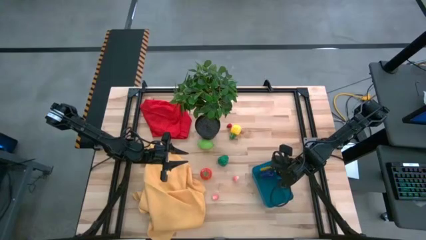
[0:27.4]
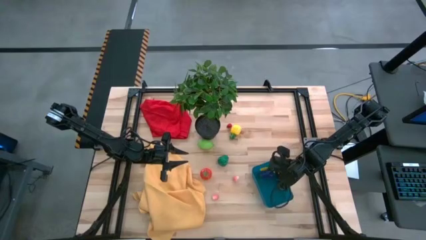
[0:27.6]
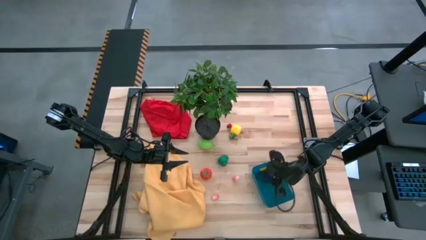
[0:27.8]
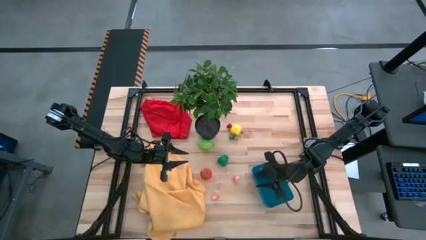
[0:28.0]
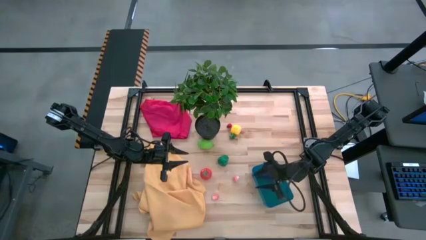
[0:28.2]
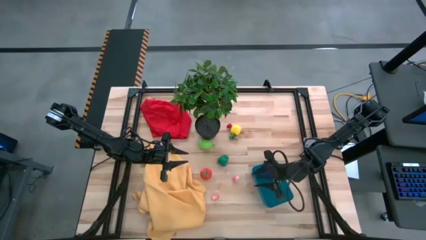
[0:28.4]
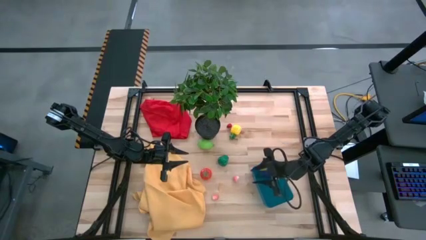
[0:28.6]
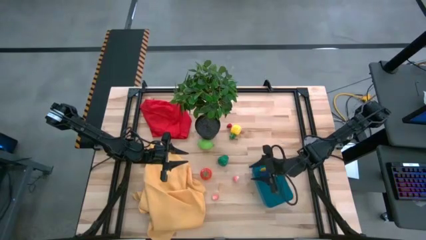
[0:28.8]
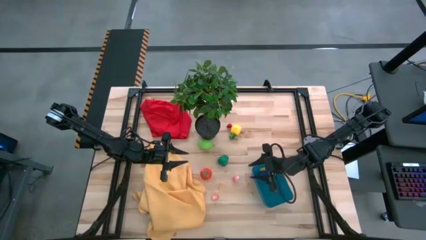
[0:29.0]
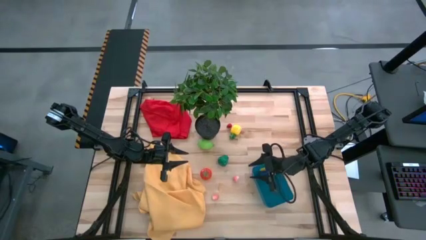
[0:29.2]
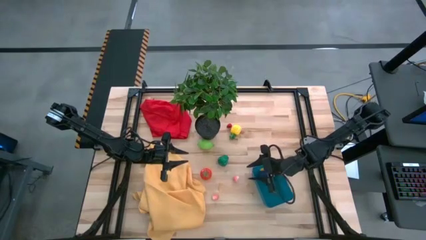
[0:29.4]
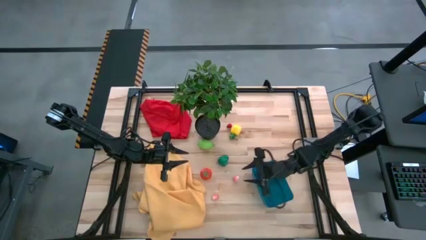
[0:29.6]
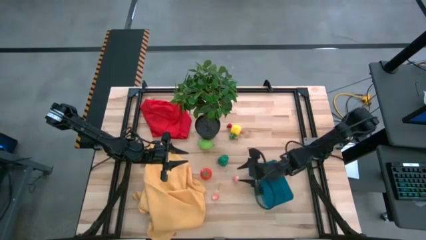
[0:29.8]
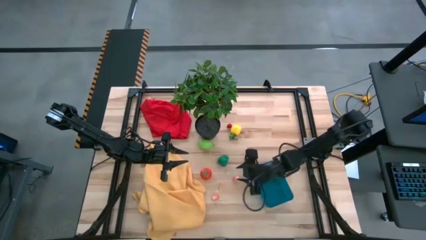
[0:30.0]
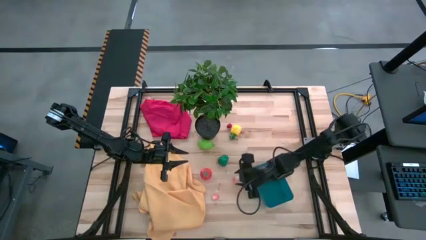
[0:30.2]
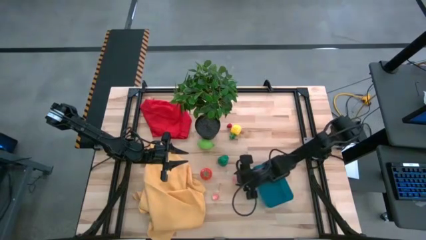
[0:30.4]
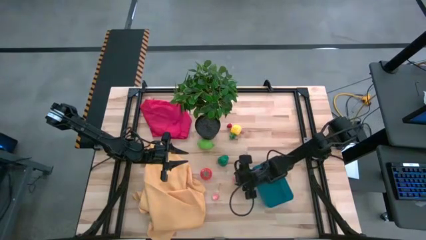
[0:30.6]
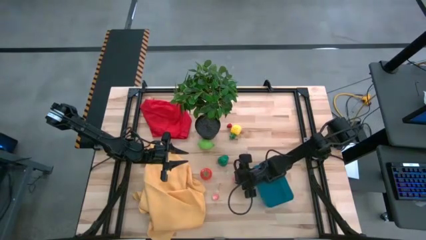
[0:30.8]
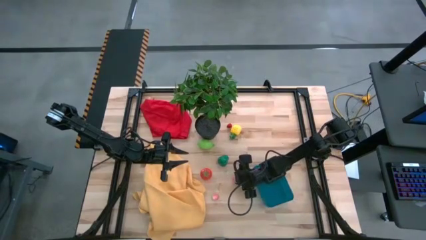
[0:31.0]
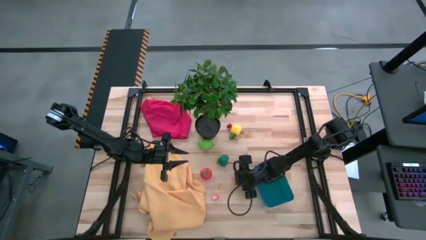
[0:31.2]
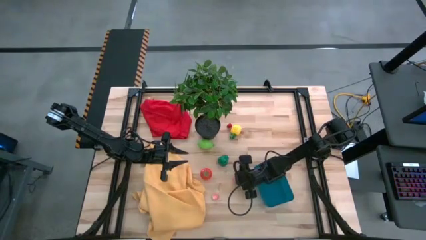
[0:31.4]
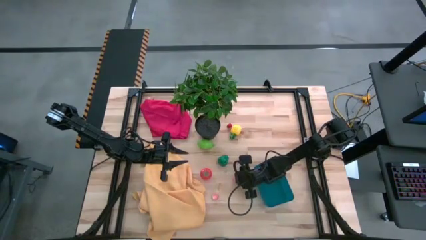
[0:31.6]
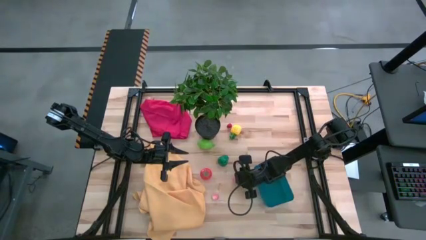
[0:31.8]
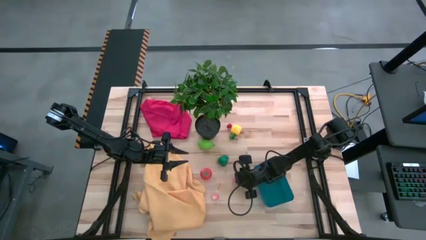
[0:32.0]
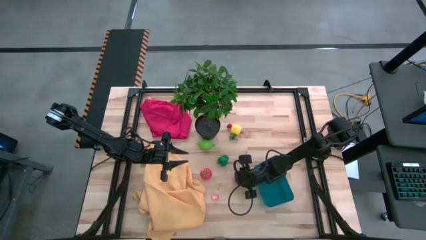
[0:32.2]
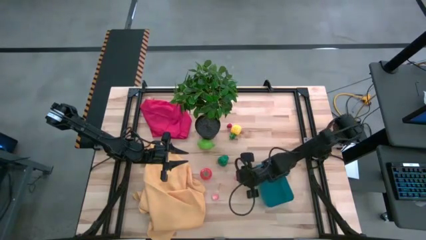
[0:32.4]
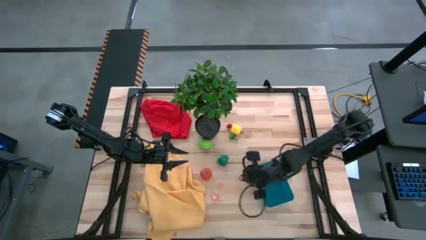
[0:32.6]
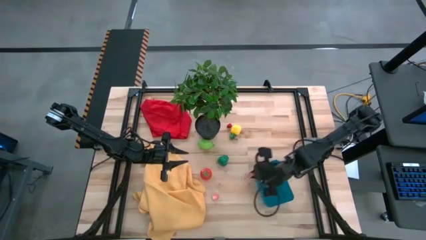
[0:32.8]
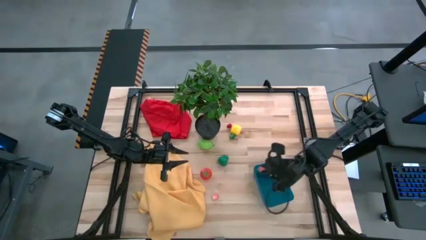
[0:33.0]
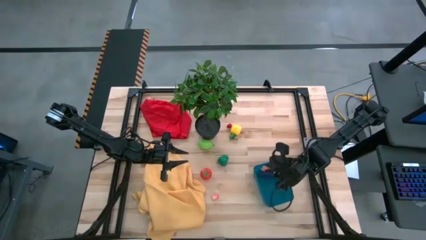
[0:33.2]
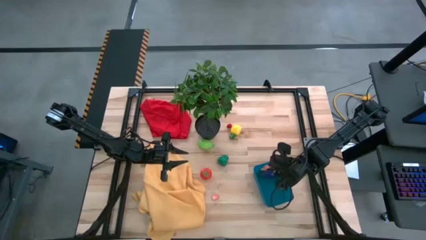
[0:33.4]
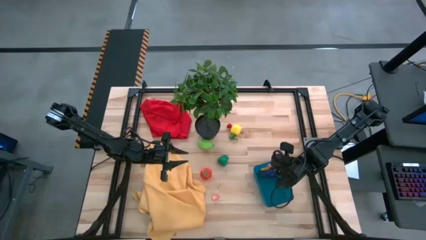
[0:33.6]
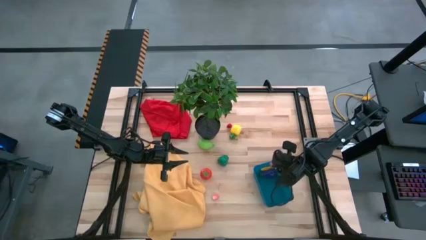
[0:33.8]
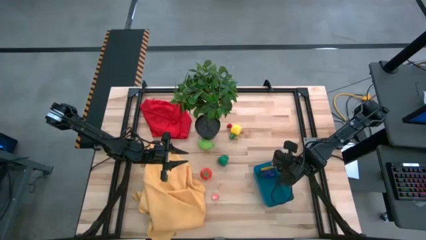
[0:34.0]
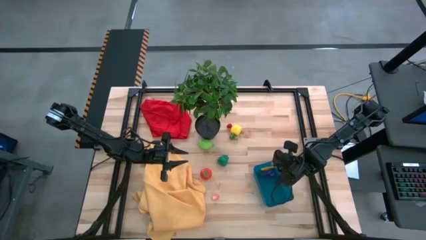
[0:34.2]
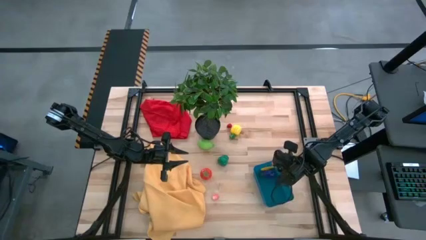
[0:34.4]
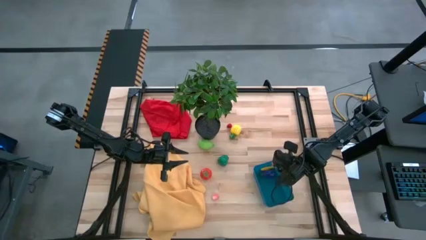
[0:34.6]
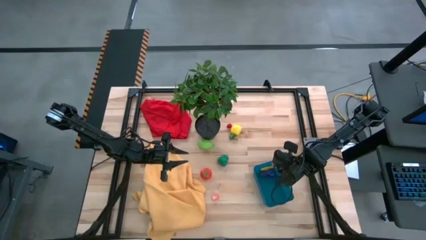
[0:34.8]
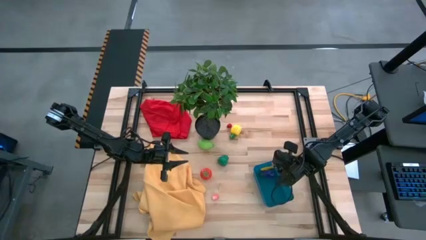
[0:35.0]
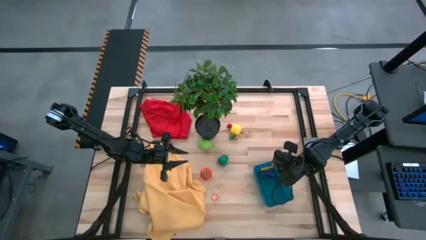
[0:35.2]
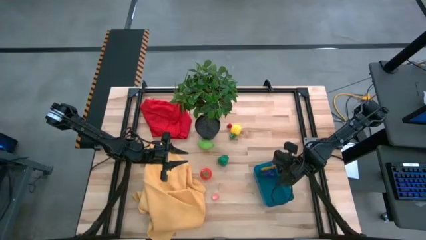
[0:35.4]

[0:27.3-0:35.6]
Task: Pick and placing Produce into tupperware
Put the top pink peach into the bin

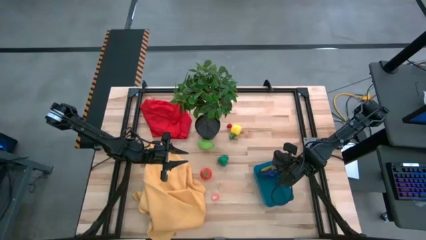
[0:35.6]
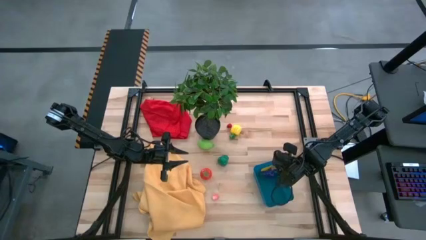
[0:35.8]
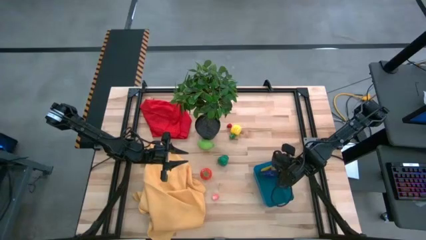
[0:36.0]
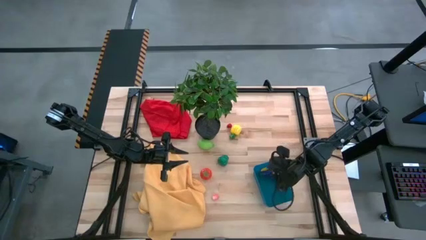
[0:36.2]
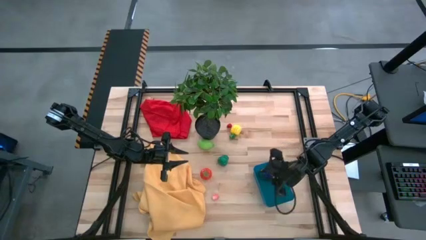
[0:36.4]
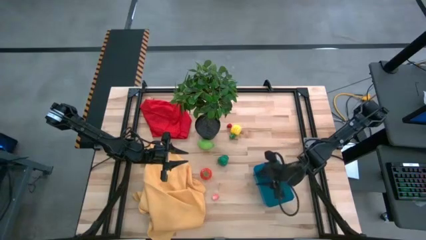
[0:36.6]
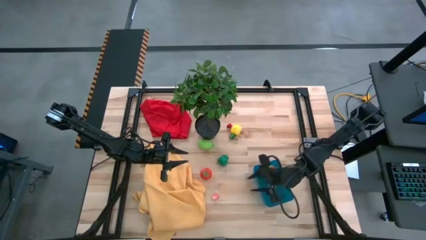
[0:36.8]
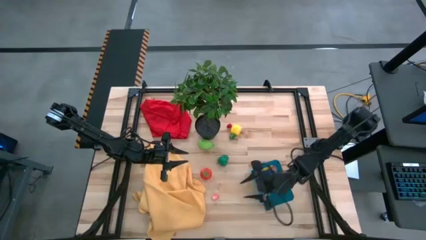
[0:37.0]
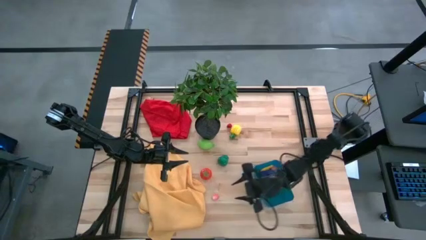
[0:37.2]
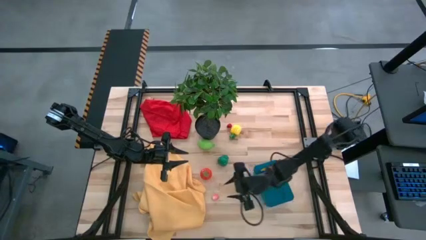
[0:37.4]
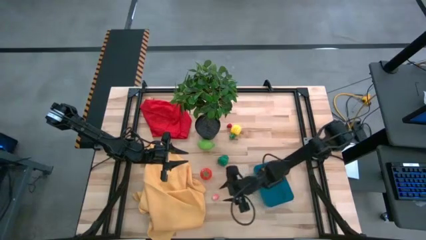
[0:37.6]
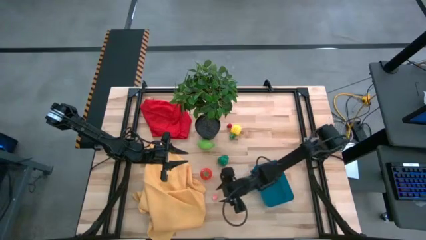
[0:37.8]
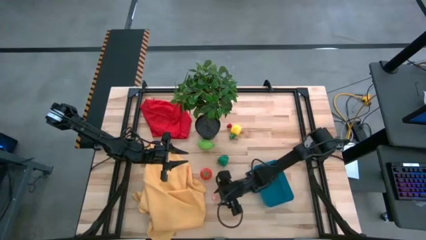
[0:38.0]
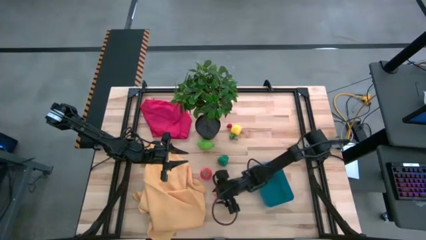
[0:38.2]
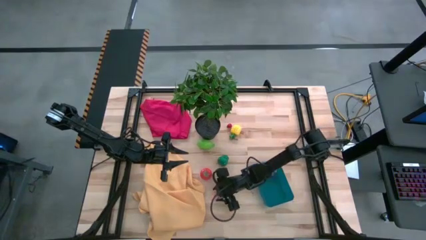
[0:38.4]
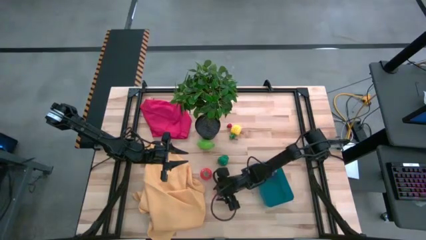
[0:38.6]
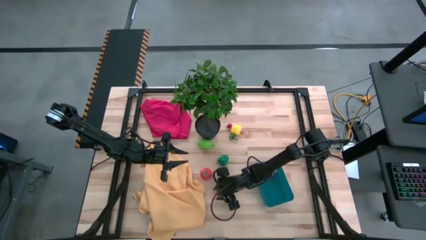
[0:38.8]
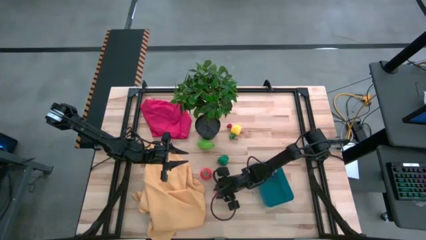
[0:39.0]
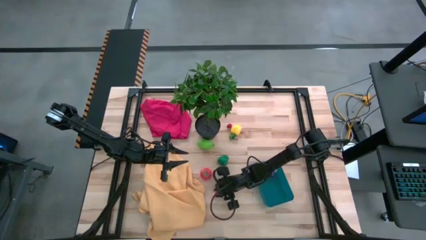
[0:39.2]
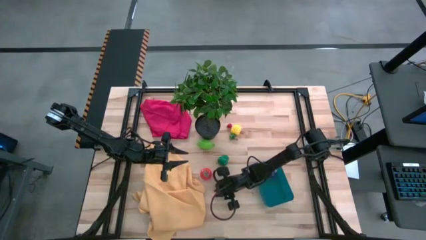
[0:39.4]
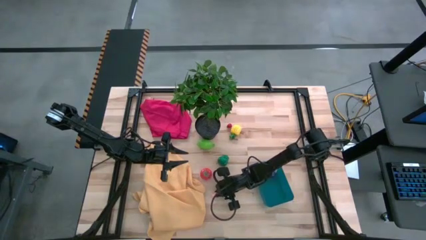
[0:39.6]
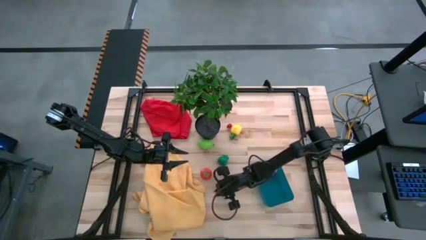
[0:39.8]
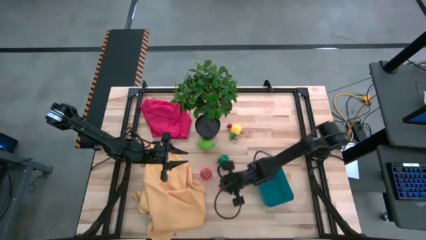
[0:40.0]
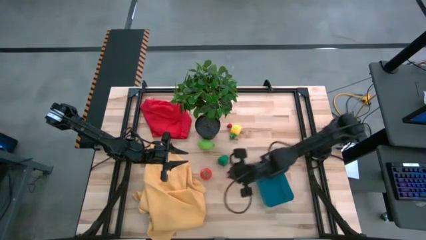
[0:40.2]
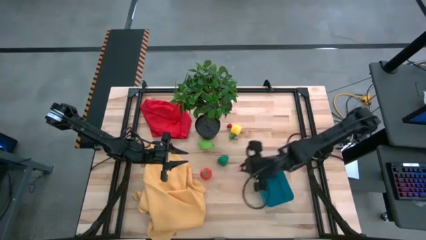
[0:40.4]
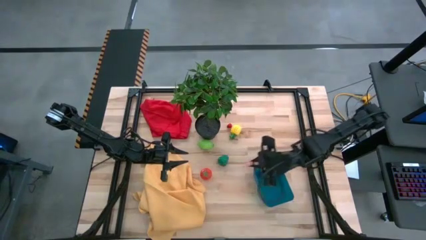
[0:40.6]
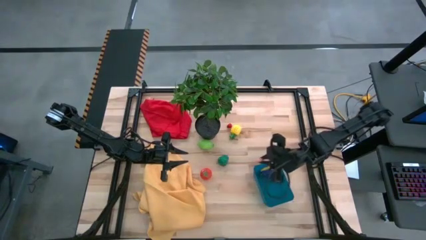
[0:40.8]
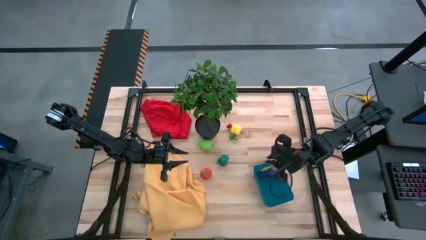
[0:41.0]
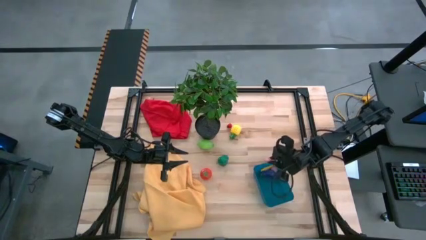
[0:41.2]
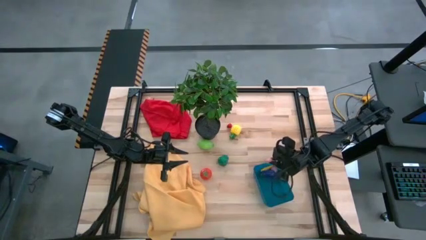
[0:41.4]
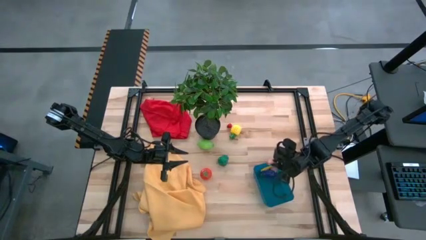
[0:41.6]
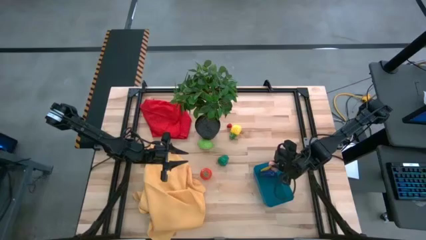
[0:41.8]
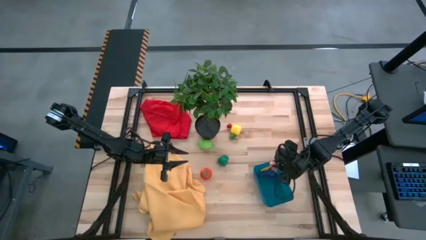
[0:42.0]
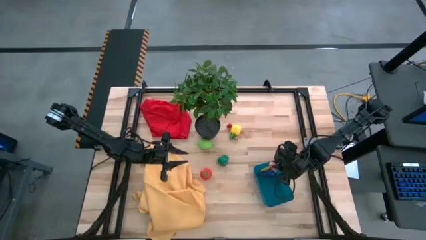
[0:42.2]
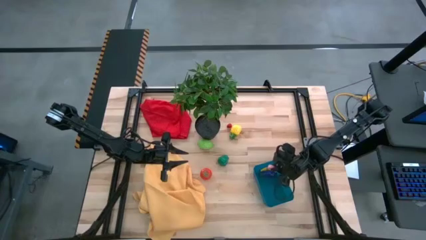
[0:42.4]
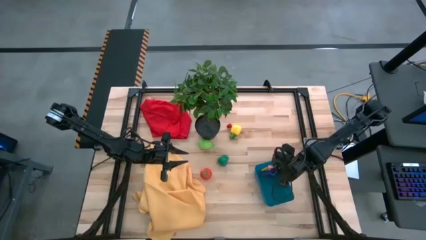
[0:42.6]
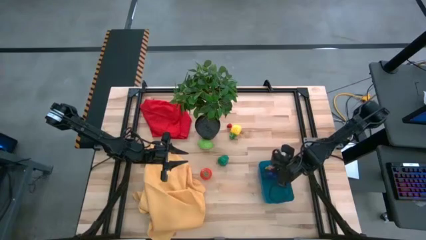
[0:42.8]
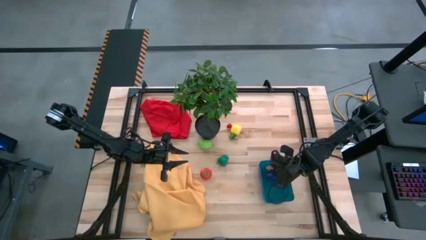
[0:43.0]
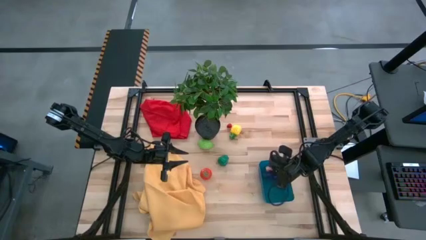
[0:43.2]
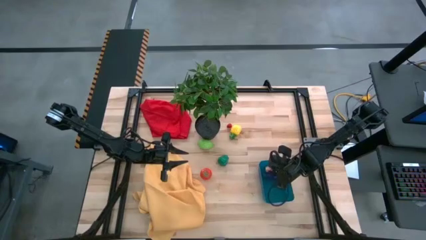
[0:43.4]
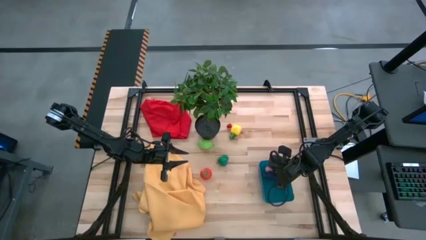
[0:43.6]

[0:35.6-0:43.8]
Put the pink peach into the bin
